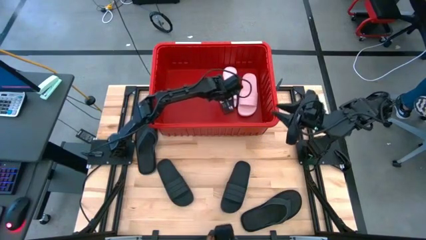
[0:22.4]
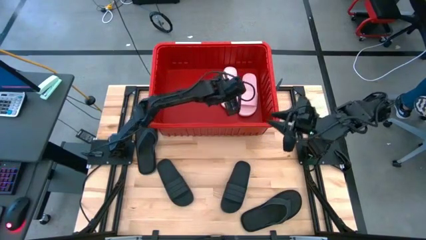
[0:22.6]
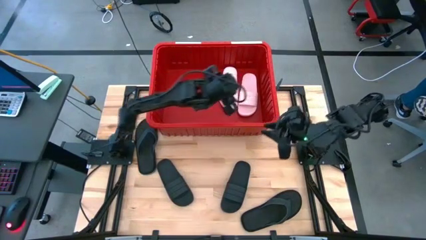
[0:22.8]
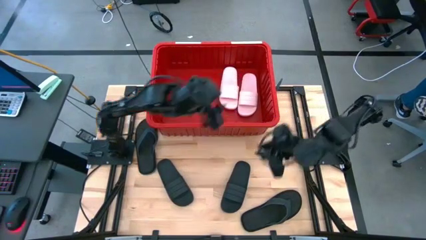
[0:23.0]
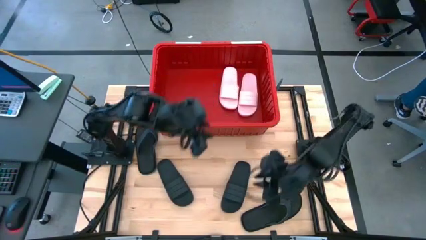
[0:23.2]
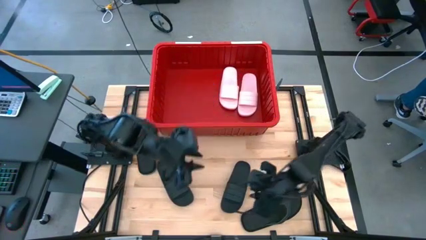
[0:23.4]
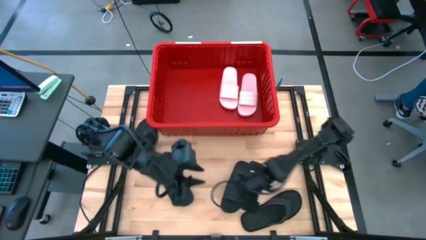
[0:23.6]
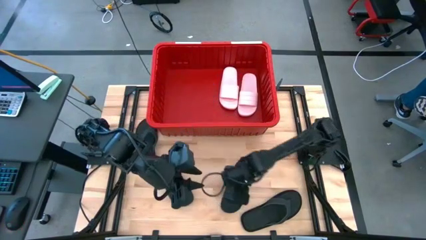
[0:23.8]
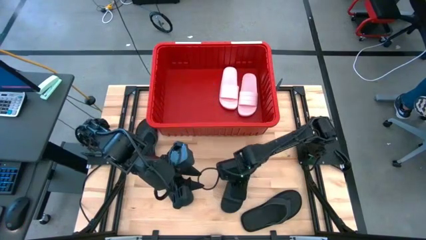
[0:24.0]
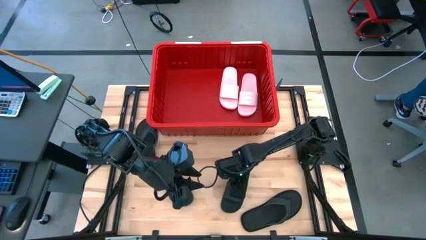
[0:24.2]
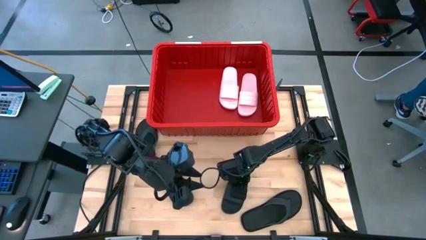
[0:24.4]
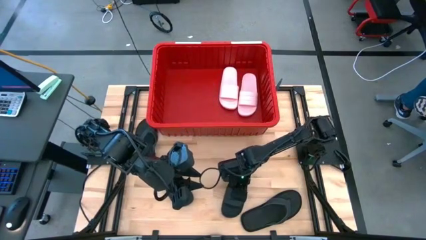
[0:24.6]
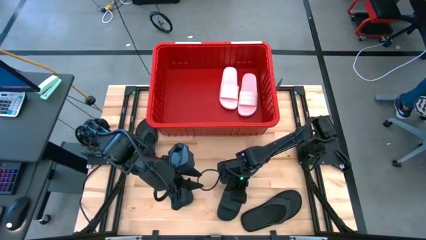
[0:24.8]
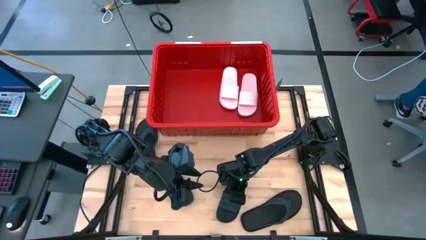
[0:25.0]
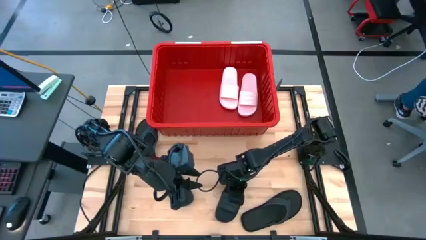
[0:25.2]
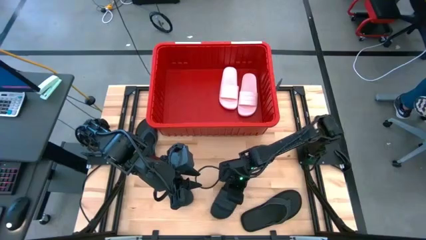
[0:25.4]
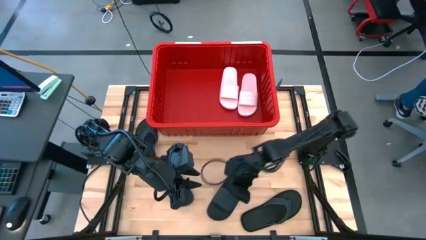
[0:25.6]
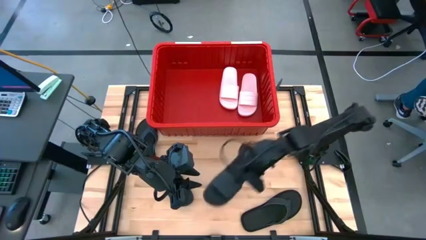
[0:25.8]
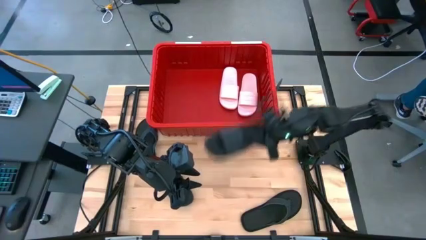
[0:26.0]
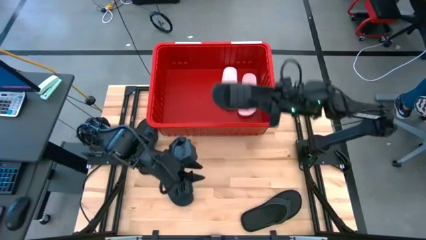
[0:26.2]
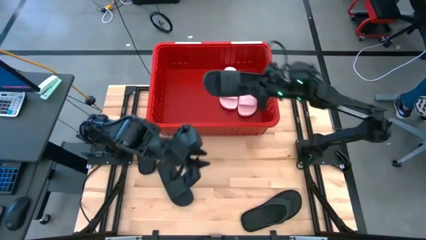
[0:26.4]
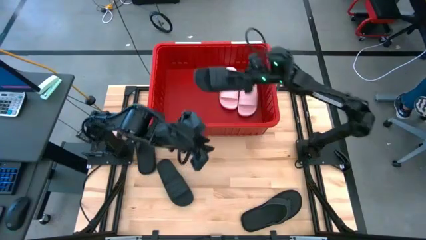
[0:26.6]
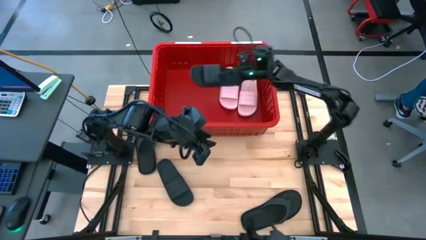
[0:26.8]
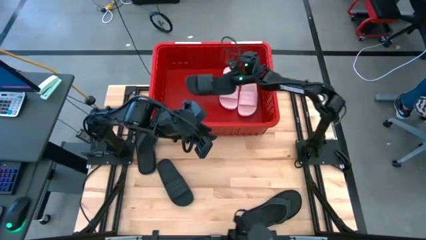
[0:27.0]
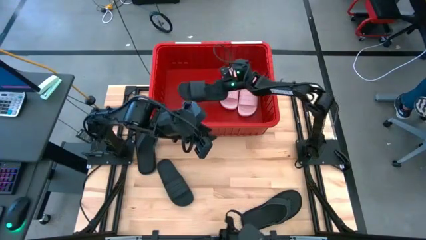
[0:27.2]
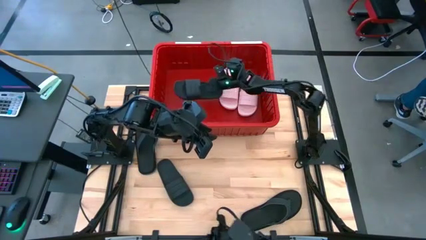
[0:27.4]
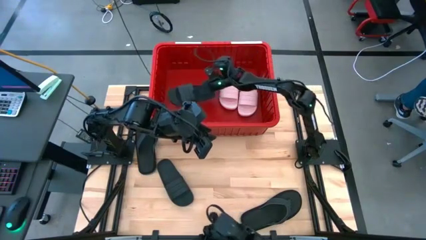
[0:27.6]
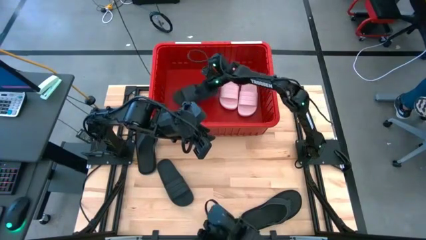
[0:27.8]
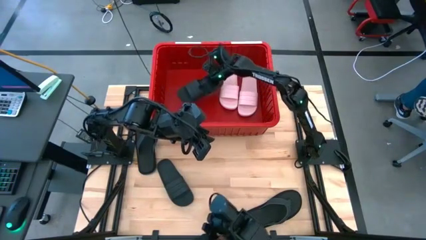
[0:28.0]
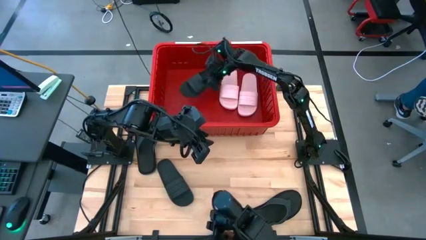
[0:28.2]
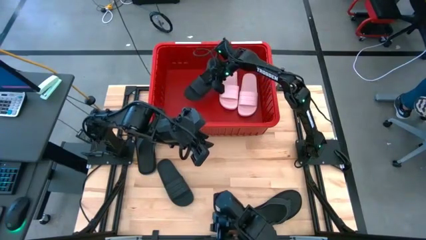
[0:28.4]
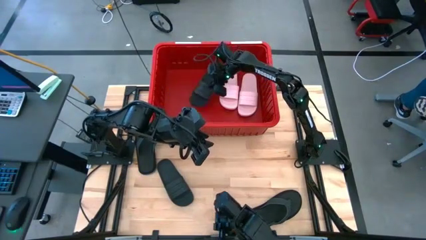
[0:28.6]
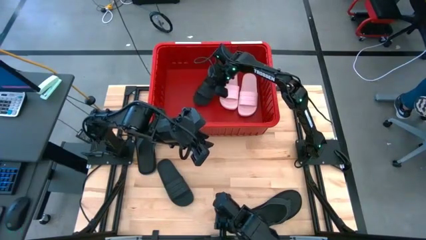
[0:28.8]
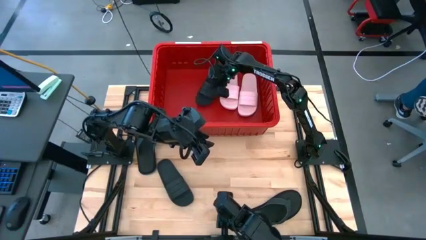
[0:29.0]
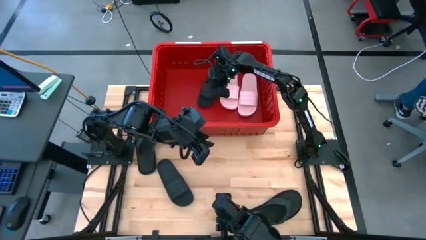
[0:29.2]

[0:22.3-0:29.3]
Task: Pick and place slides into bin
Put the right black slide into the red bin

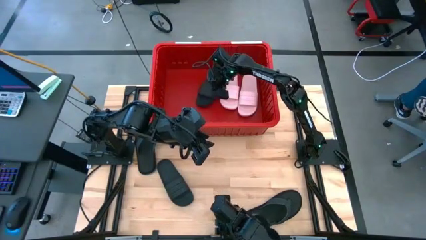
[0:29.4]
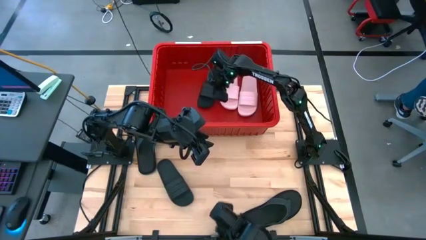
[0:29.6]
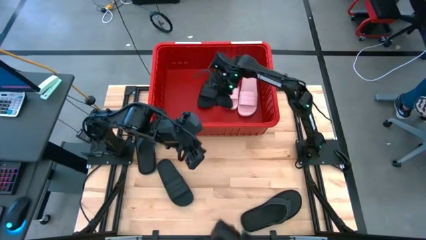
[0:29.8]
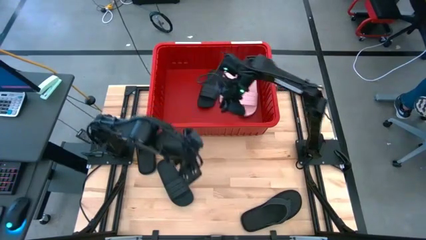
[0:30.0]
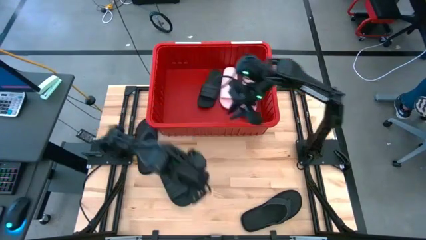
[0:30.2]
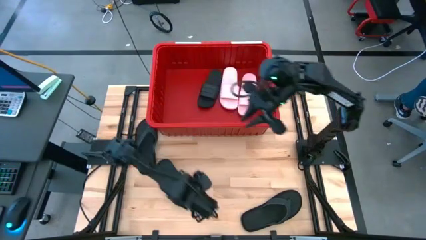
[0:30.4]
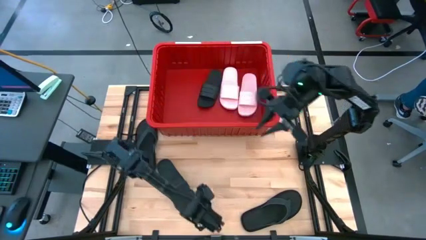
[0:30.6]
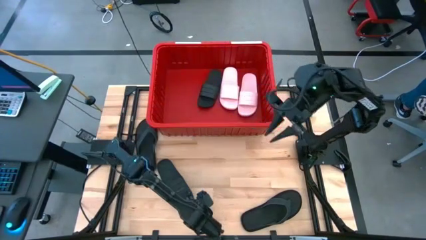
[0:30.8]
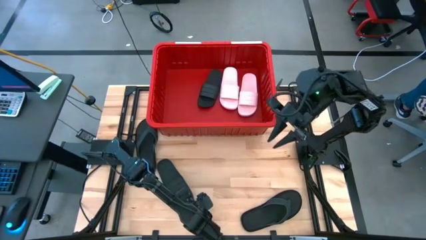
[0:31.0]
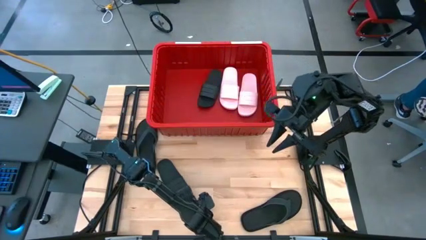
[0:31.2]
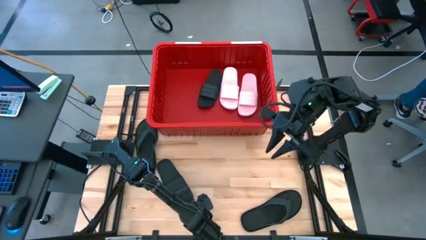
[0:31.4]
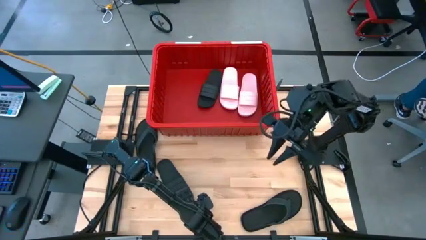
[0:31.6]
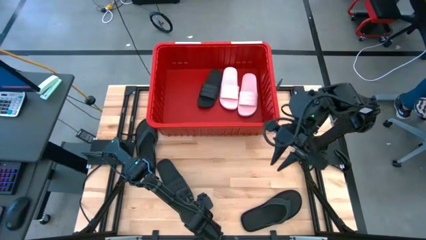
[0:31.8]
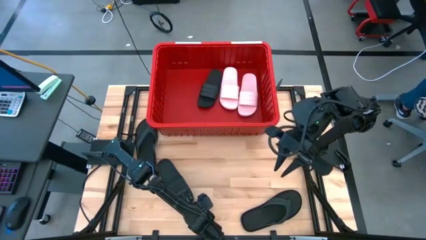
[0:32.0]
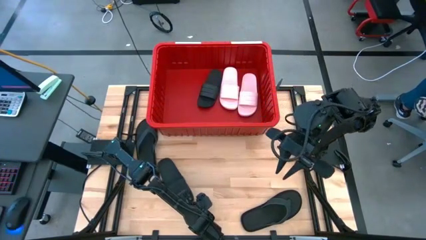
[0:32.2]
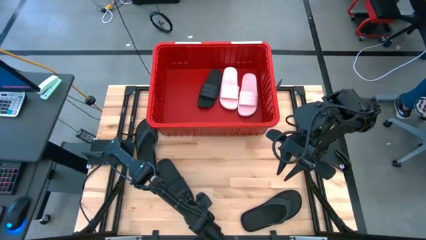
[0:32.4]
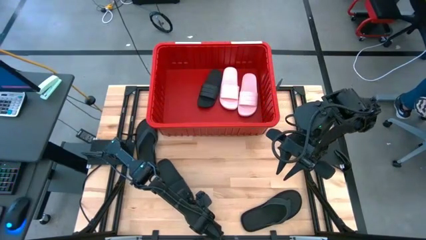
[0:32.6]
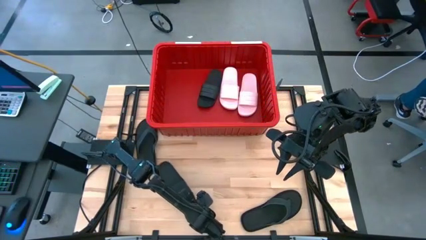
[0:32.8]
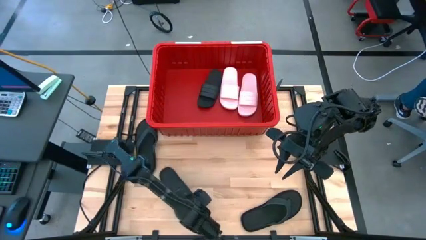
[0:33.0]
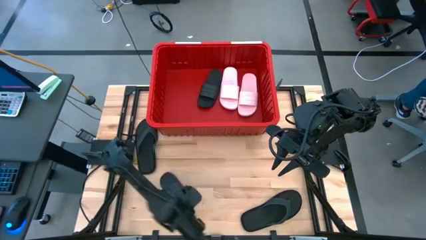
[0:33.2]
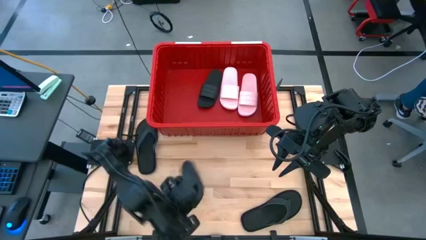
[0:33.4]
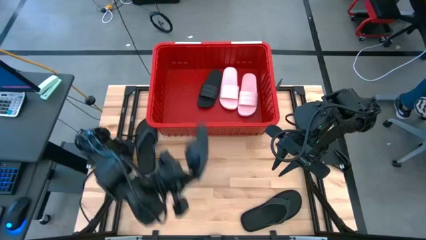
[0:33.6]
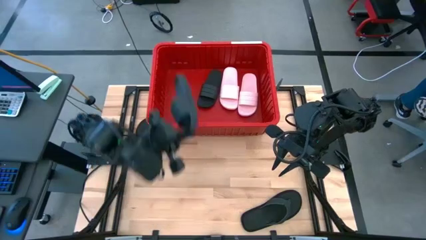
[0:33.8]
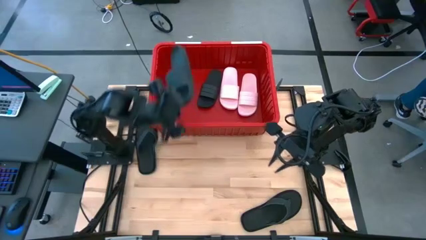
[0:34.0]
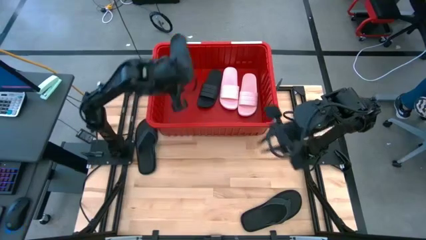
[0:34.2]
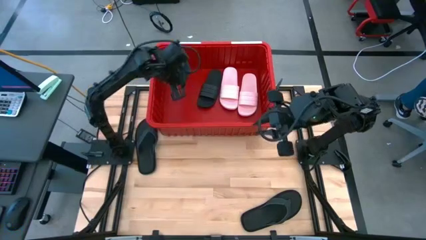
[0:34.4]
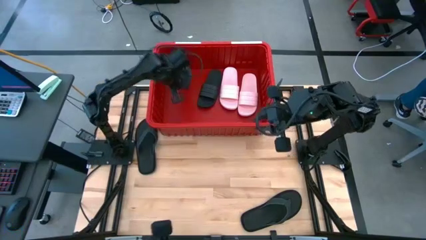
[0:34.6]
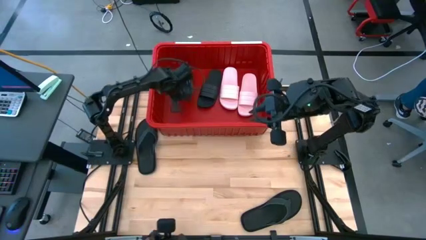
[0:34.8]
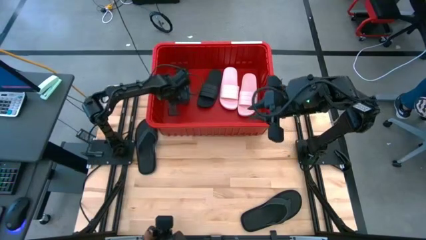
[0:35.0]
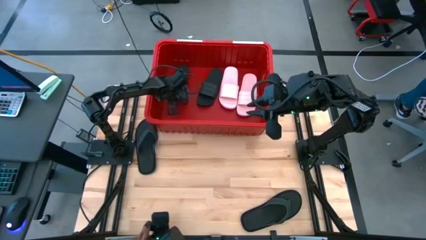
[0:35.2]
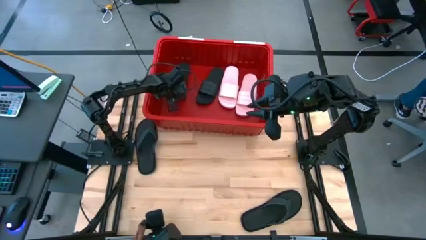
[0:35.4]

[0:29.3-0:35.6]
Put the left black slide into the red bin

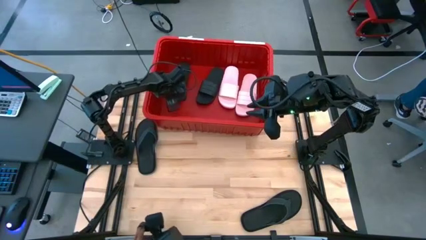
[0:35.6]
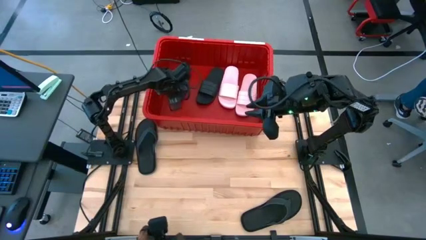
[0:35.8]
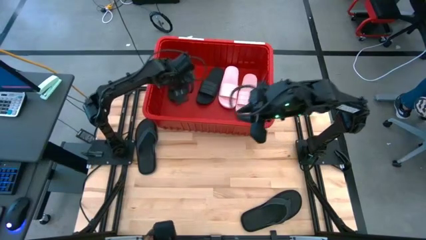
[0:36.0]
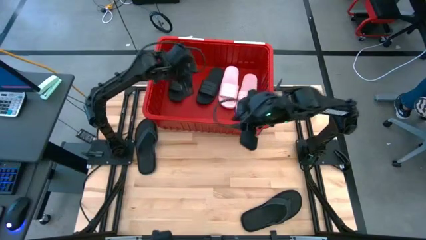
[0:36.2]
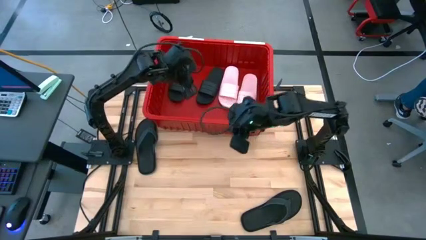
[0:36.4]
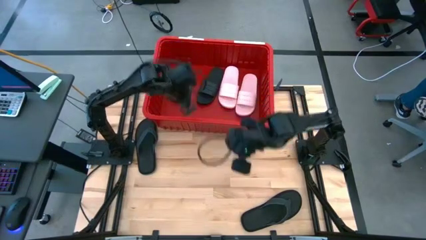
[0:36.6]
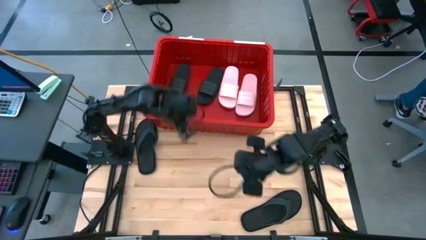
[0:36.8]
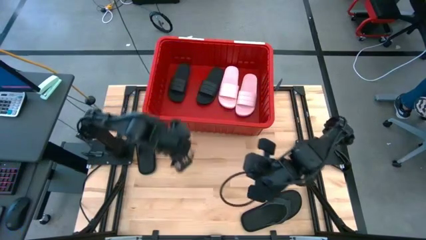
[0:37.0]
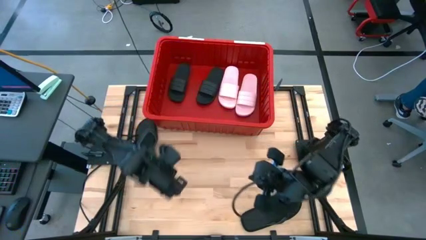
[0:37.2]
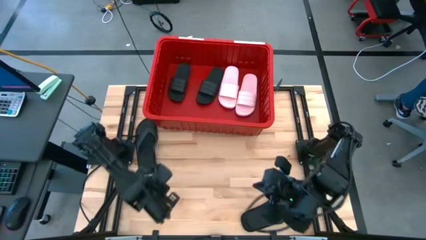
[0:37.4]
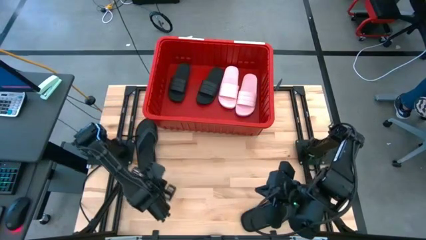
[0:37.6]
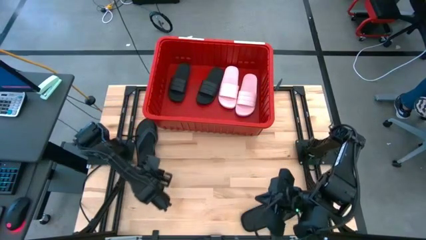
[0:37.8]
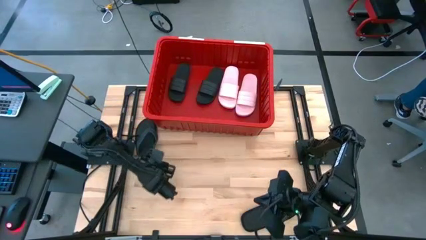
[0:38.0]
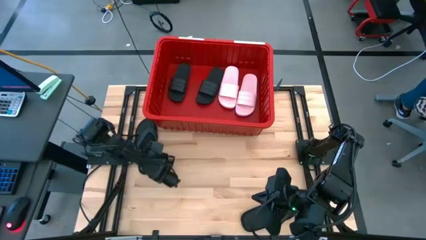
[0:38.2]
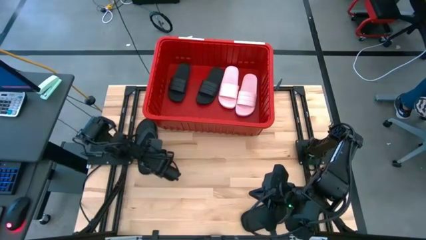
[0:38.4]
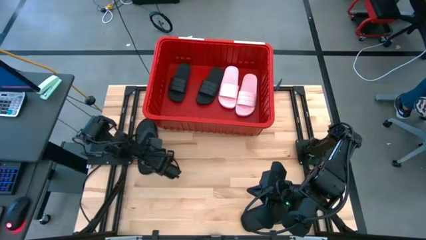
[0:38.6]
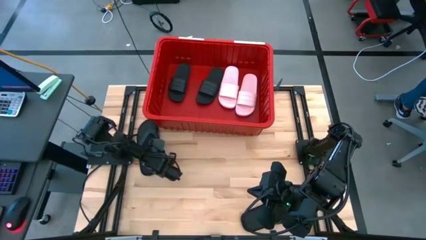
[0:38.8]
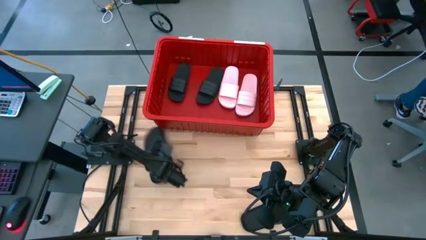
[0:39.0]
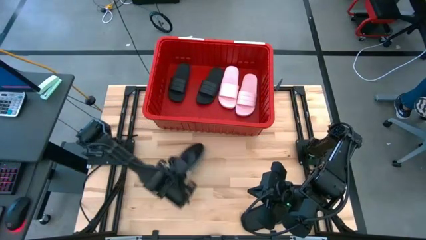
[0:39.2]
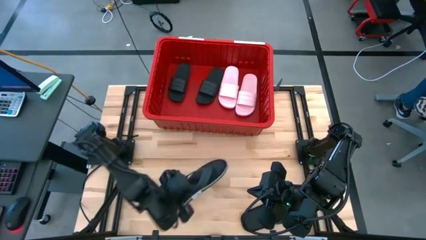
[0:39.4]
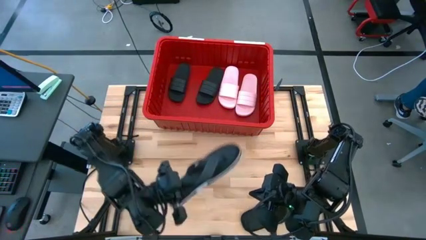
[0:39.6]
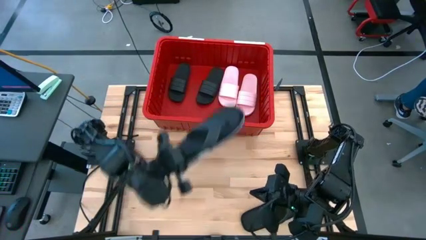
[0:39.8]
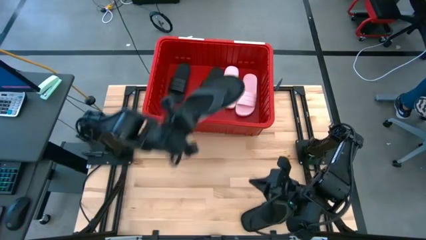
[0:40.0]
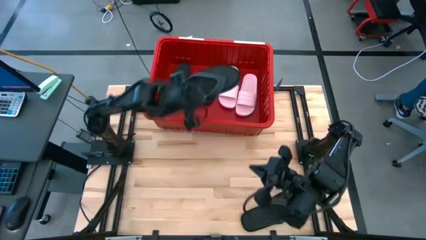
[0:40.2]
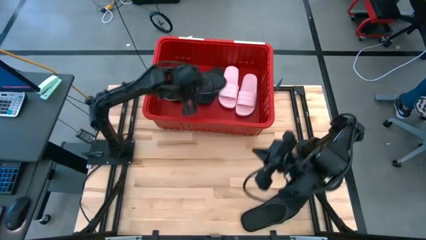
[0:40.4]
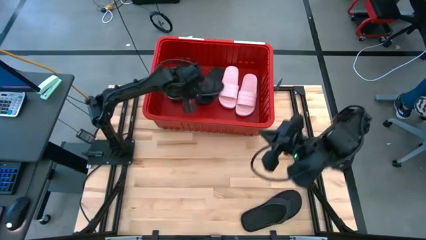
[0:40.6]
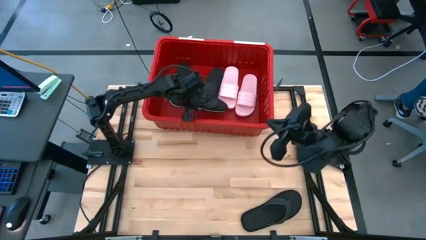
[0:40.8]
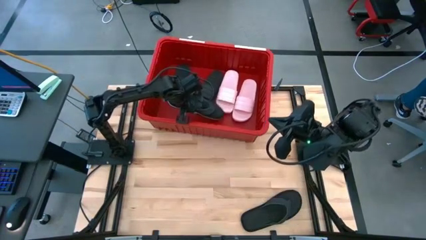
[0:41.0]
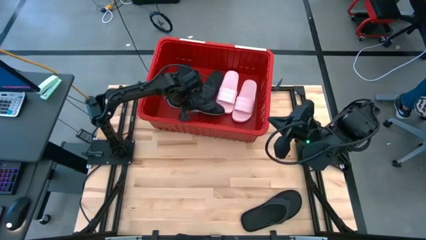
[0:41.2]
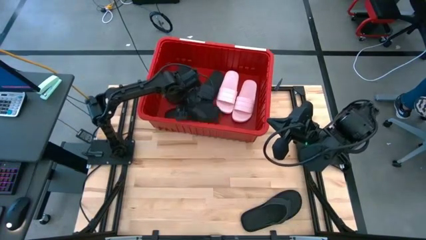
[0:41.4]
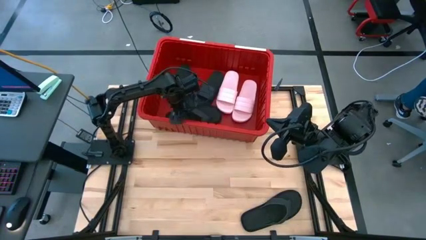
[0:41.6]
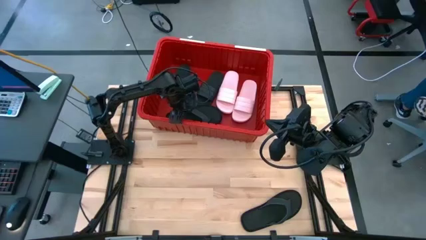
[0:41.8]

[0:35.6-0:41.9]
Put the top black slipper into the red bin
